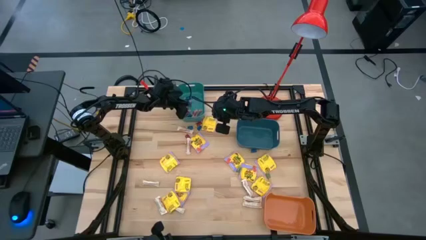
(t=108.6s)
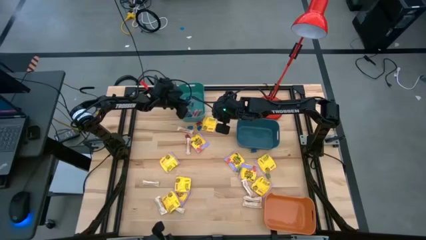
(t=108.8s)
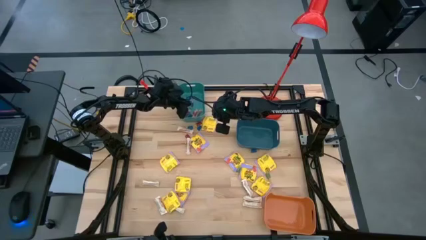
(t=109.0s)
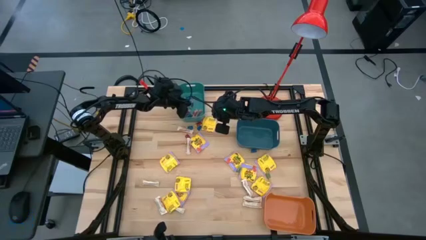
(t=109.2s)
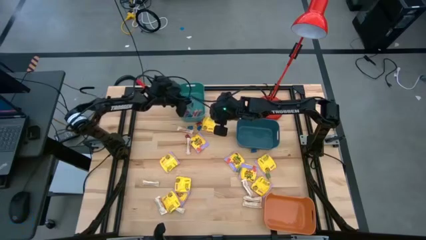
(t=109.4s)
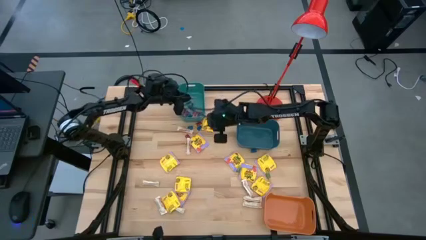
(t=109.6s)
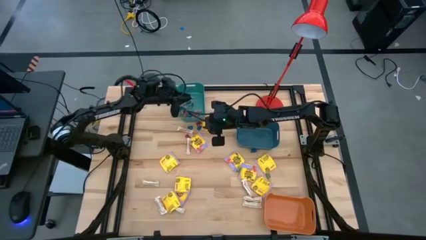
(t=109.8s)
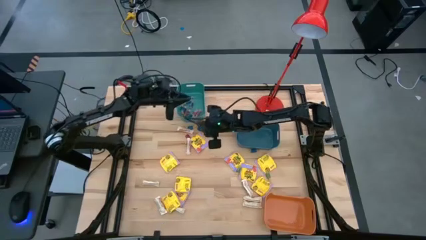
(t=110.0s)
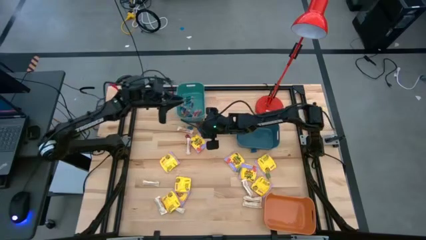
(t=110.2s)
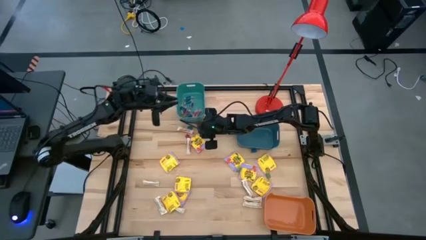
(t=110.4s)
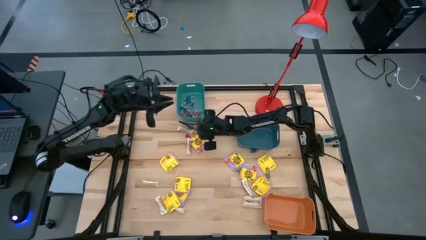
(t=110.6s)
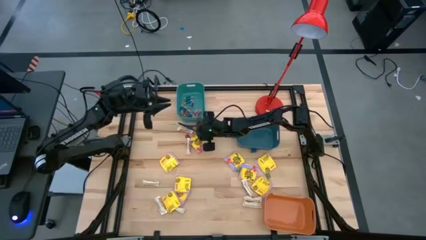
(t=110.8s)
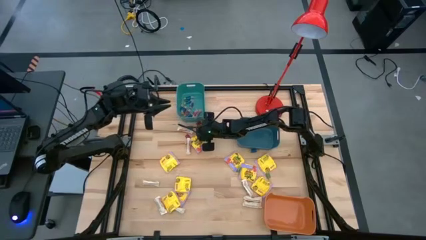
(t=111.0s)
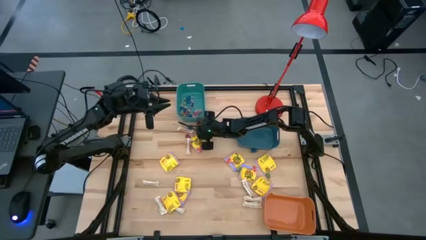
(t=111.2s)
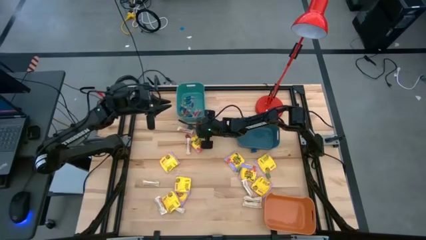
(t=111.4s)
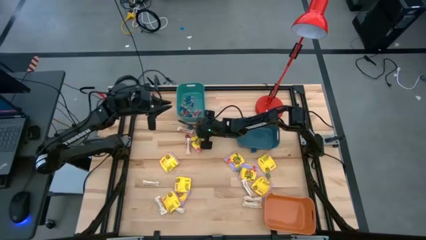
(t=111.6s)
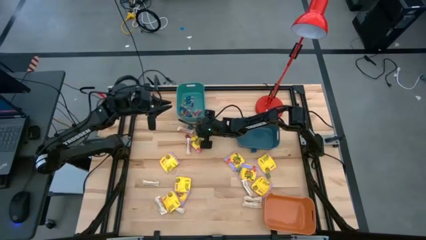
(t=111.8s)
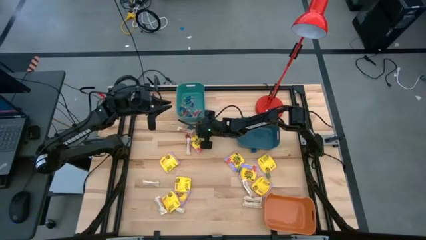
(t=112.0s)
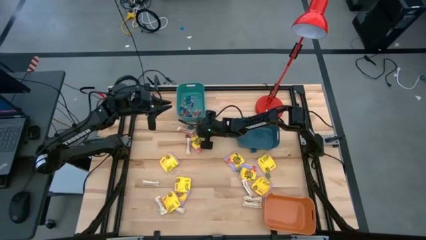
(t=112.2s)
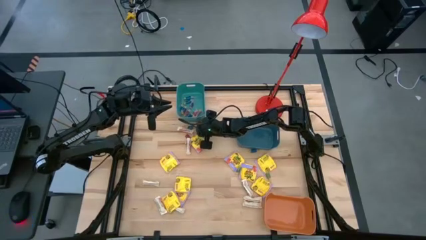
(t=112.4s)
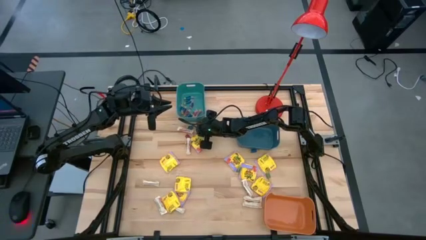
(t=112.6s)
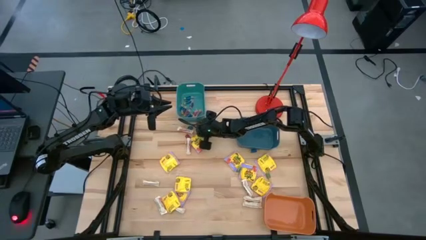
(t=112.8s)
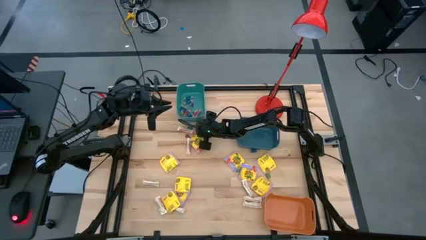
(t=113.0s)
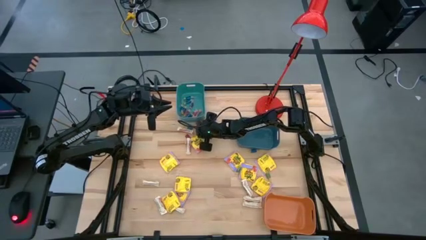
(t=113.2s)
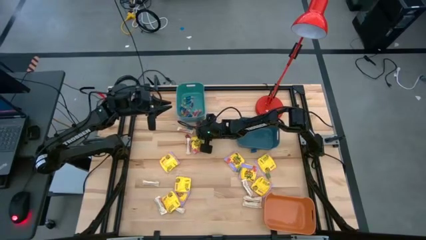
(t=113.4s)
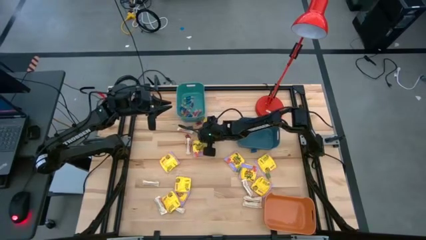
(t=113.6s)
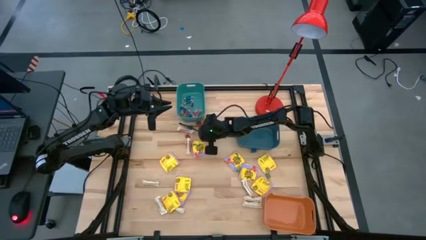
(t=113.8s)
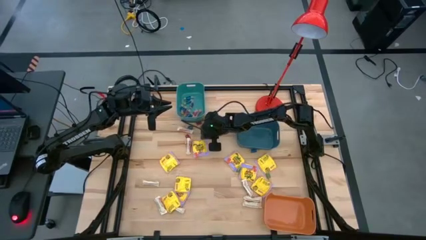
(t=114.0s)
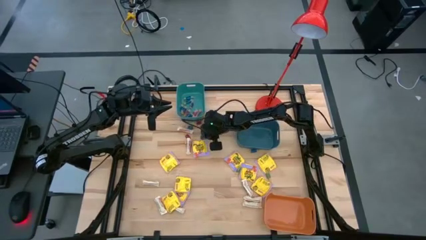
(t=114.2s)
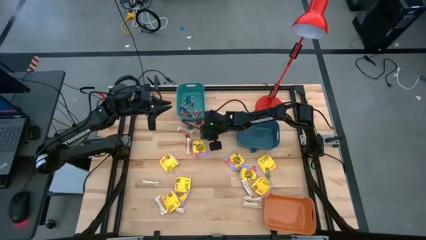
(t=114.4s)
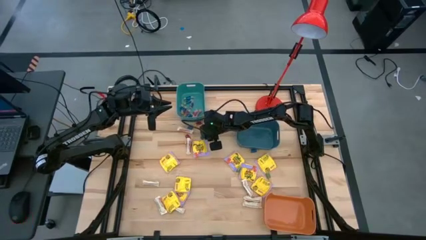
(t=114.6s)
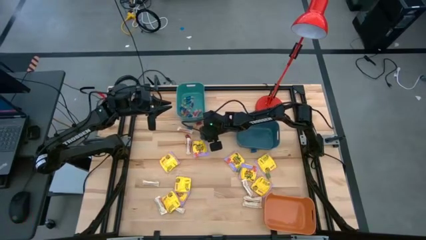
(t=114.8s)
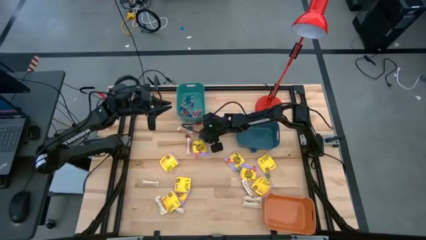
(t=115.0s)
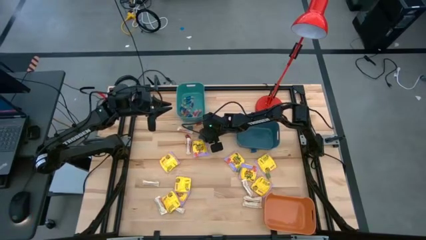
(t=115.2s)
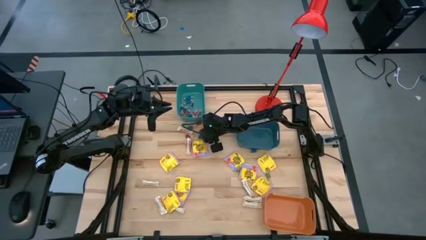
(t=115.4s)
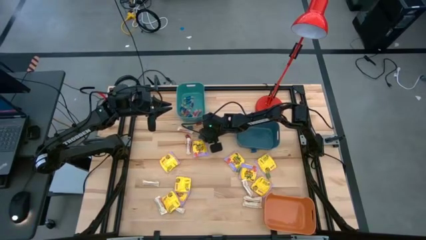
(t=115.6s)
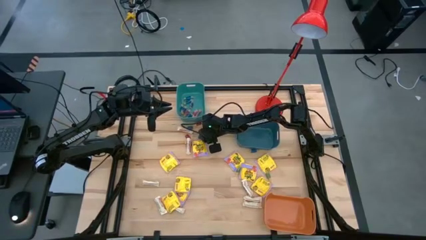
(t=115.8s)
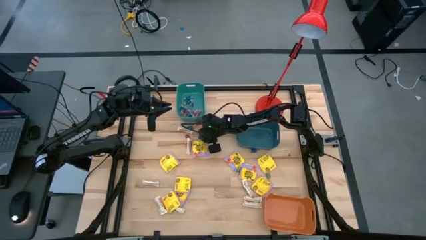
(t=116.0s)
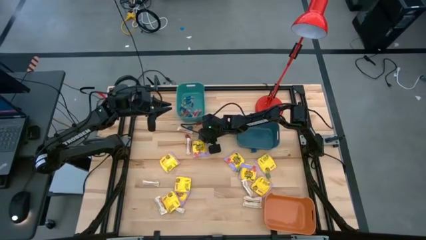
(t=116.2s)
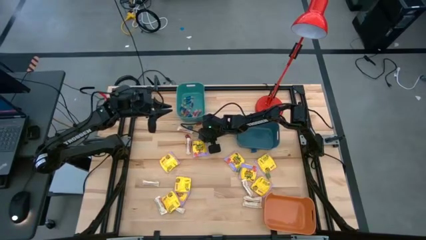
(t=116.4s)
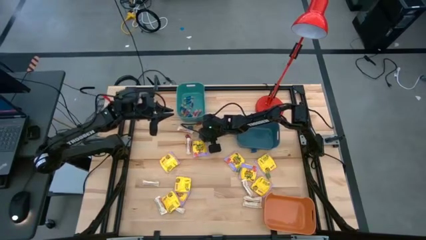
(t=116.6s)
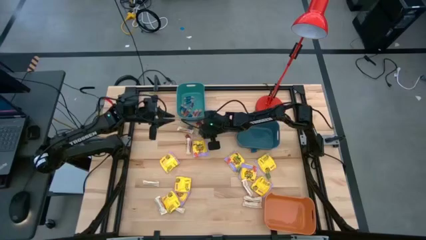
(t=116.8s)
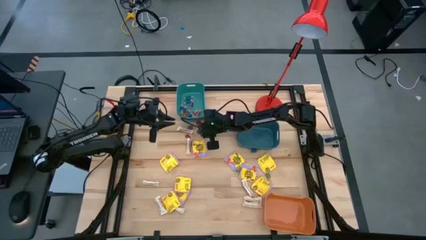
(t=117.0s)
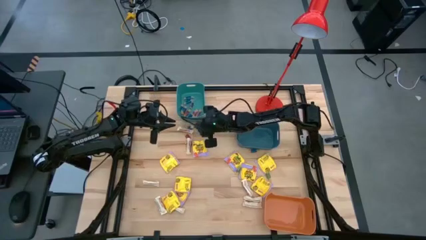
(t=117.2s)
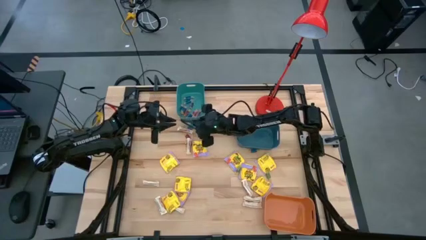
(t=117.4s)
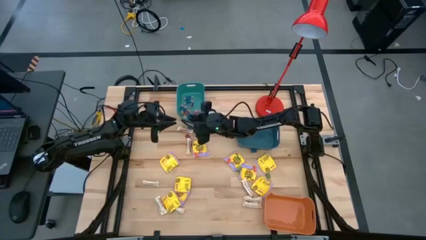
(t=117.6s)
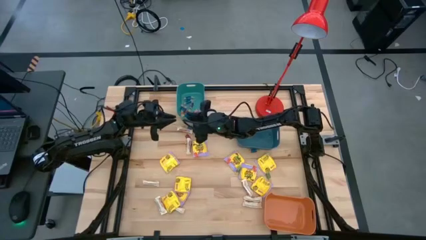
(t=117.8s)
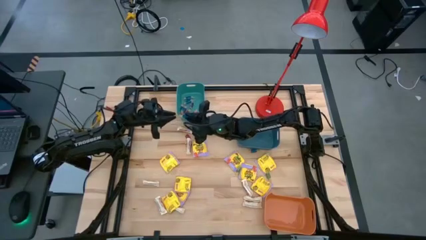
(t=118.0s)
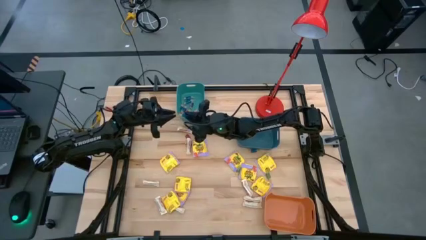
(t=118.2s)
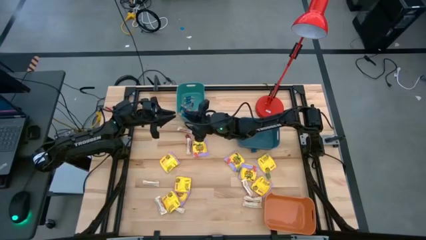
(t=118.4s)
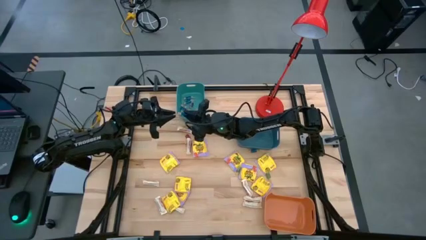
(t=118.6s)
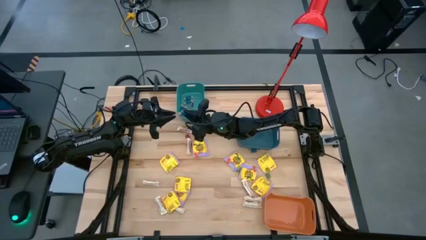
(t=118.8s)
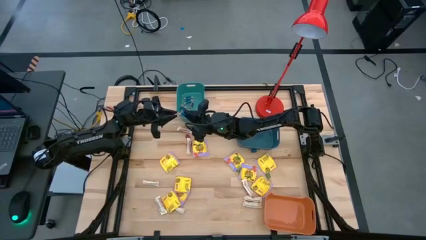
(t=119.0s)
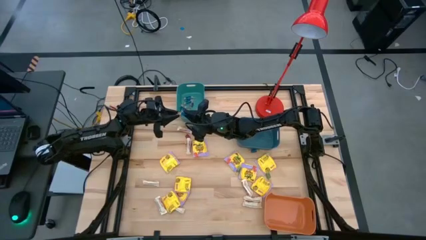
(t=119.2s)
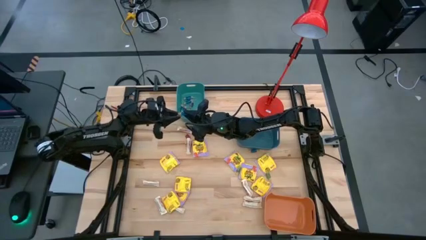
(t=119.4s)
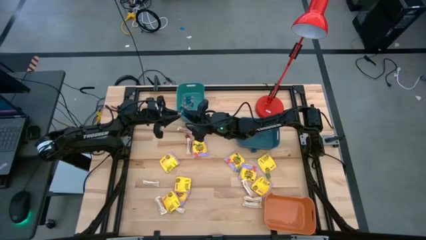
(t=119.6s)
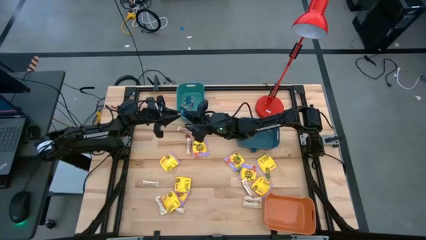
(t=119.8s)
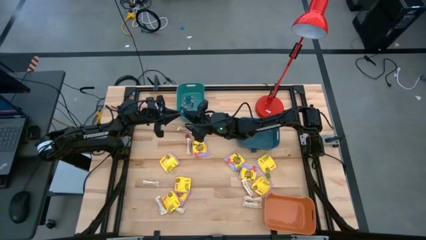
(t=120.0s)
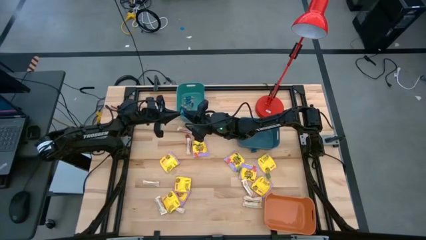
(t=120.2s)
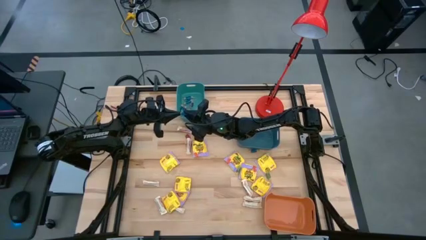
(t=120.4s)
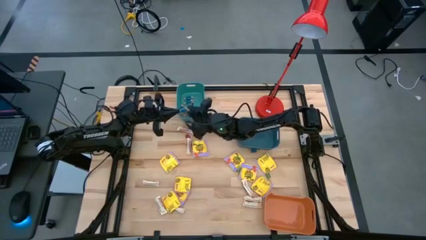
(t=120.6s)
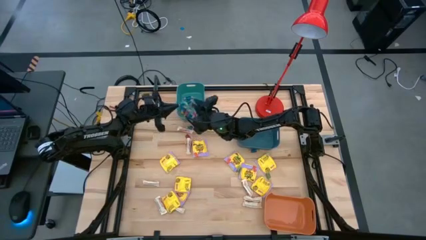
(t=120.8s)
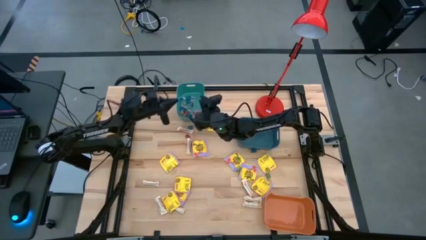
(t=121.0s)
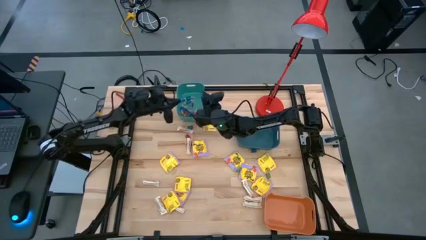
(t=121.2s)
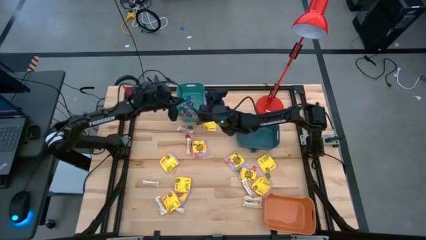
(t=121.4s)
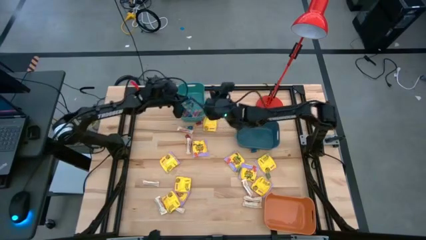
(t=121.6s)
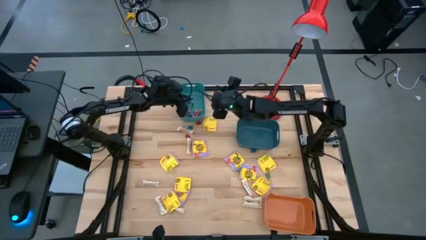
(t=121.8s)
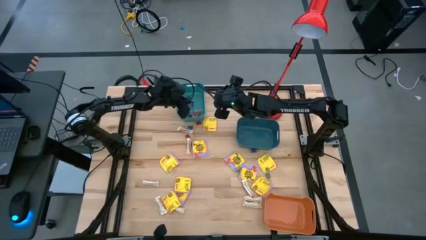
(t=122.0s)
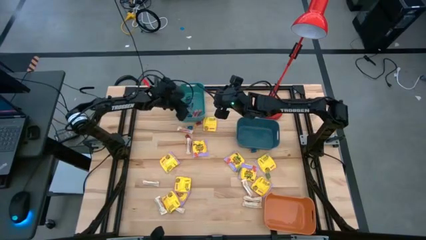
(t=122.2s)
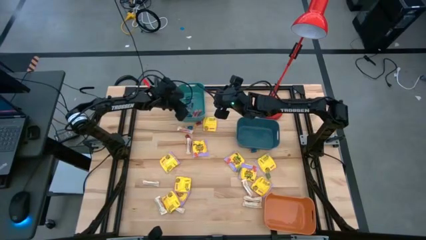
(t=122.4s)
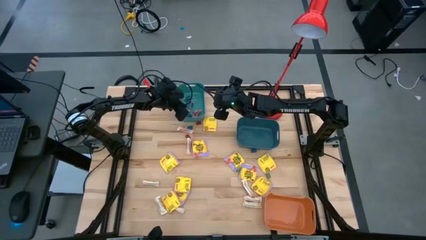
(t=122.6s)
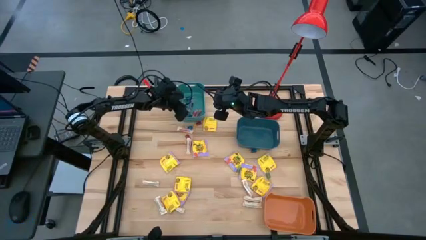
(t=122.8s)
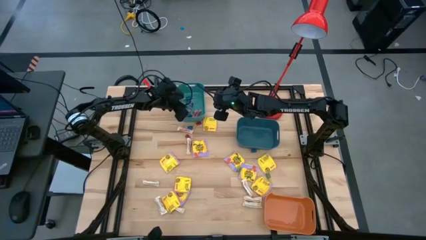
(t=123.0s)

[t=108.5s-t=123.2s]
Task: Sort candy
Put the blue candy into the green bin
